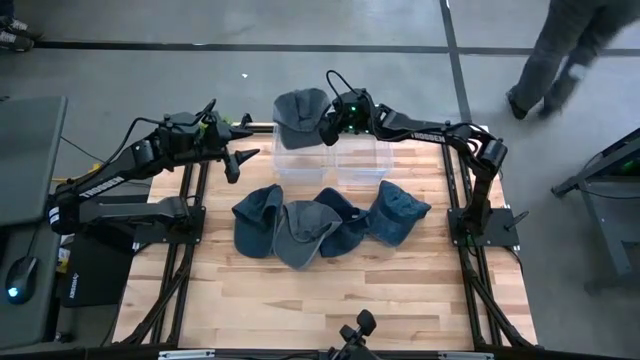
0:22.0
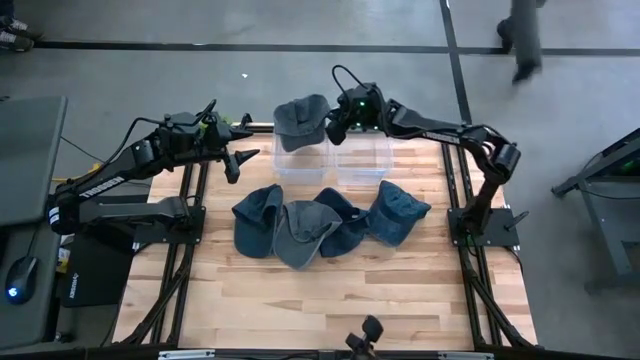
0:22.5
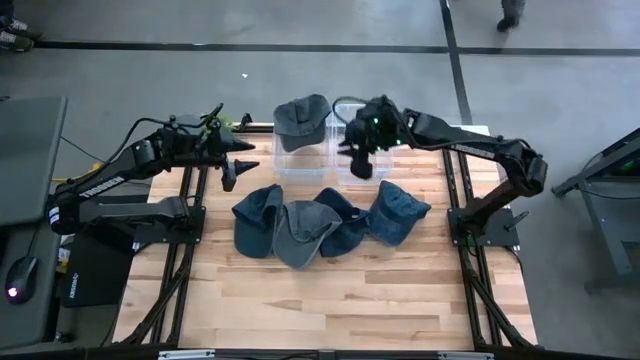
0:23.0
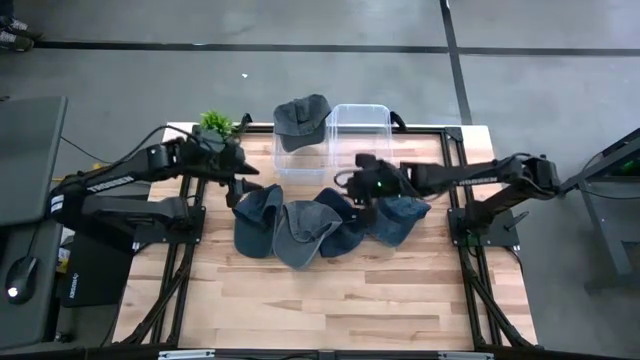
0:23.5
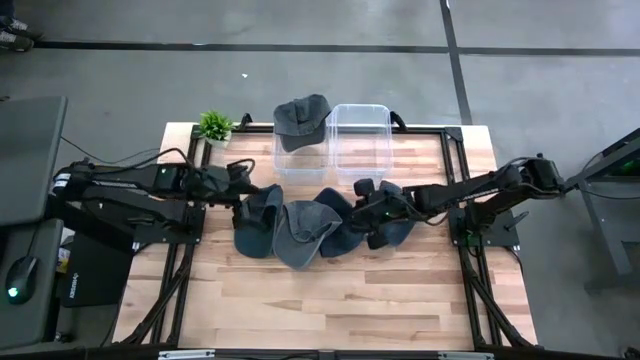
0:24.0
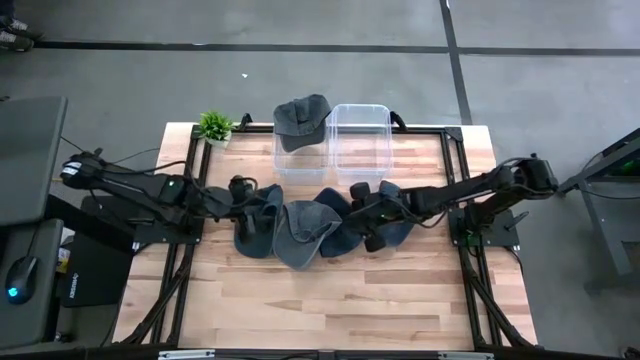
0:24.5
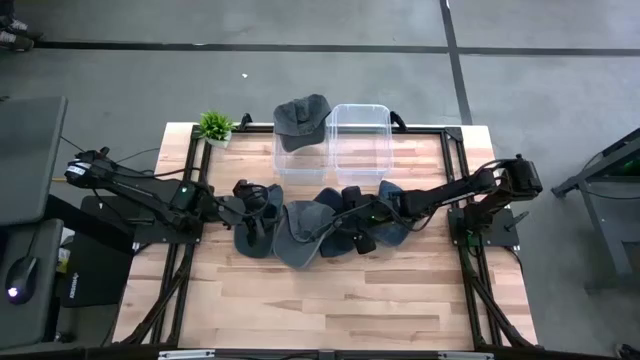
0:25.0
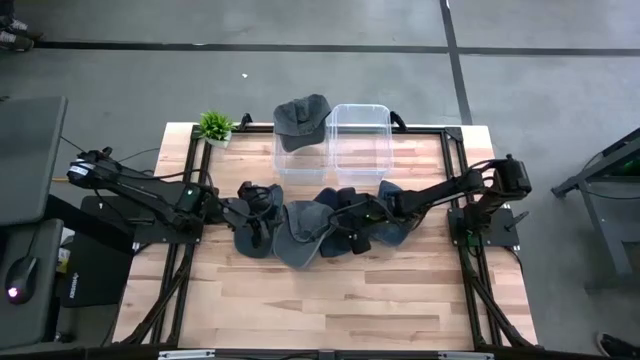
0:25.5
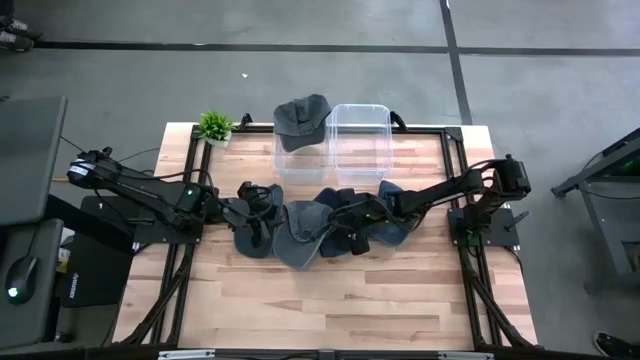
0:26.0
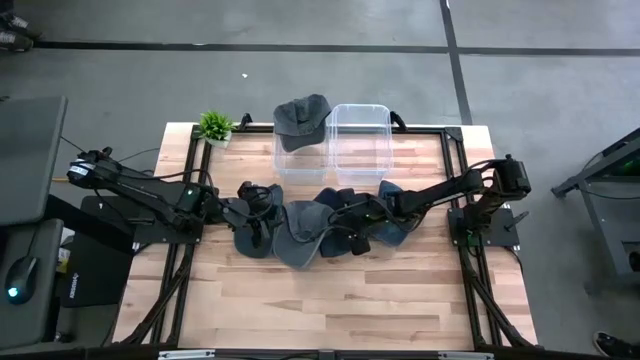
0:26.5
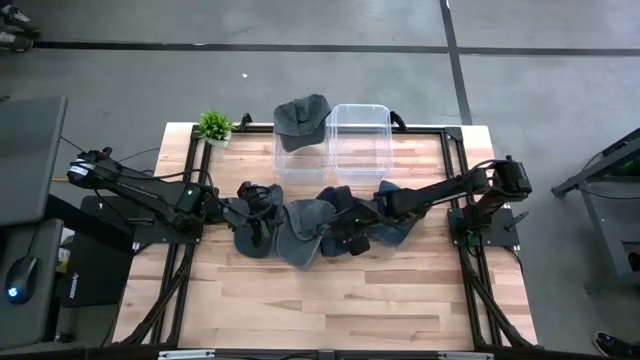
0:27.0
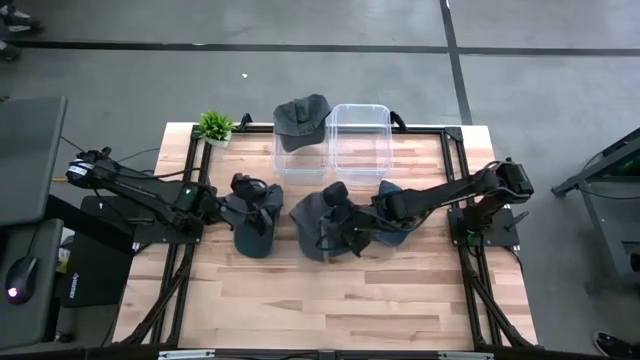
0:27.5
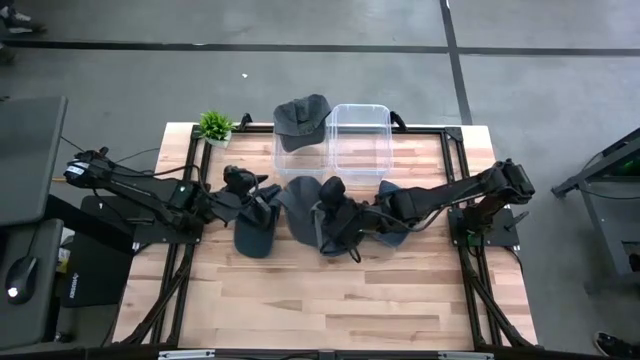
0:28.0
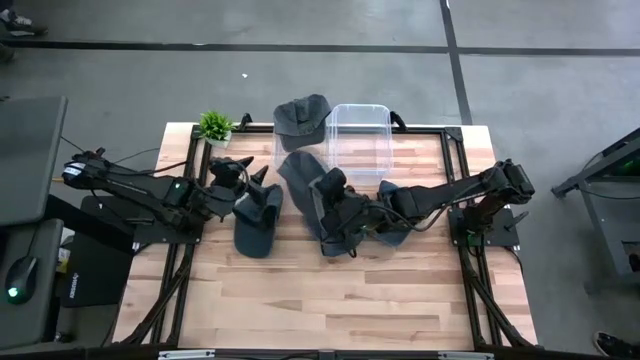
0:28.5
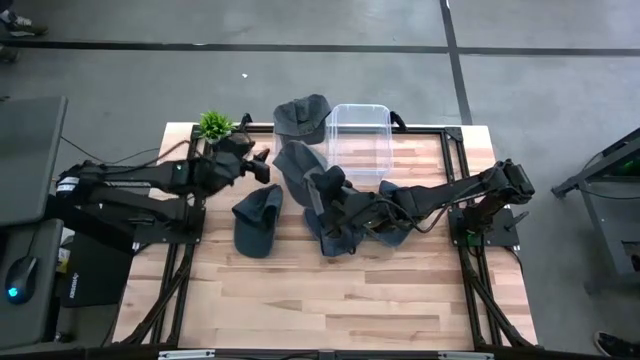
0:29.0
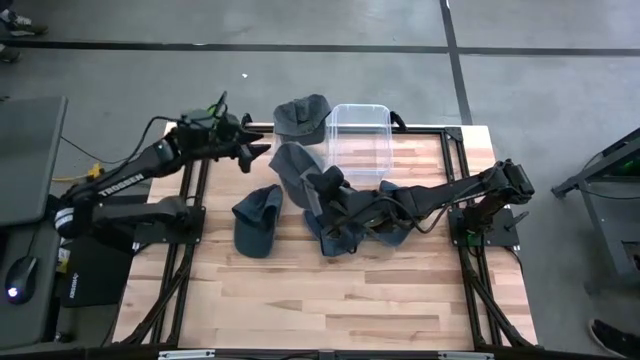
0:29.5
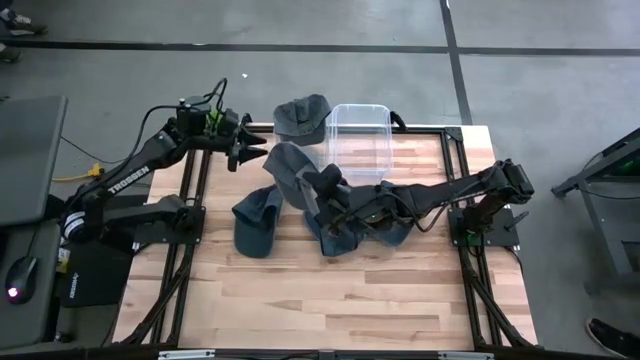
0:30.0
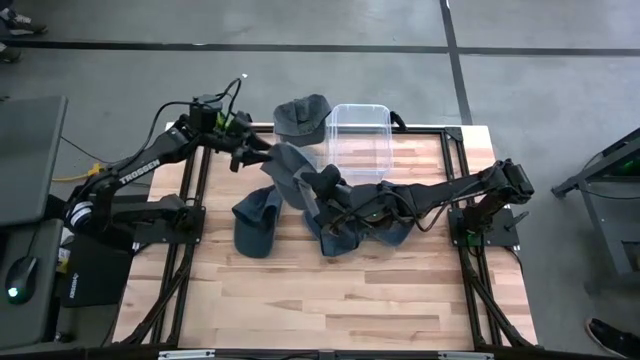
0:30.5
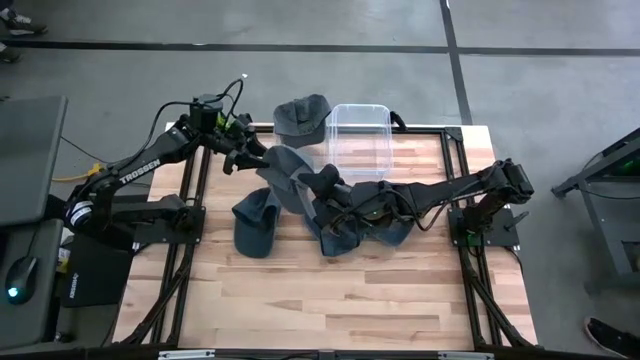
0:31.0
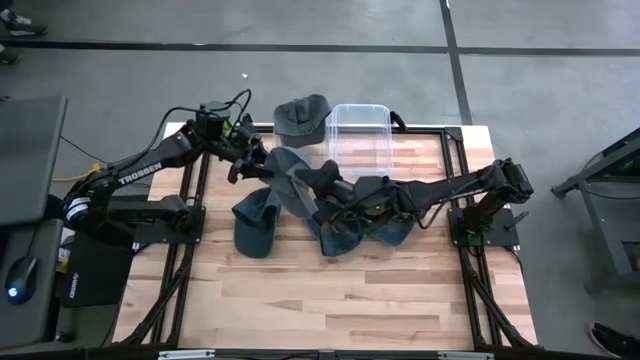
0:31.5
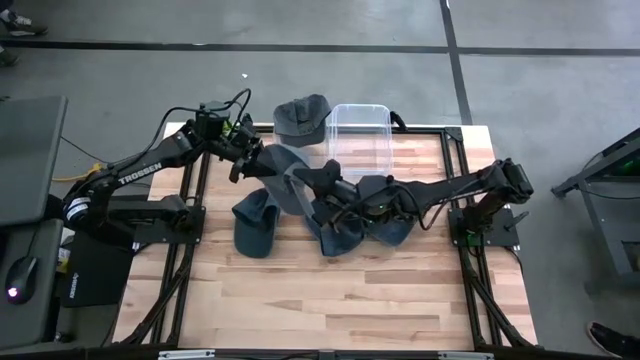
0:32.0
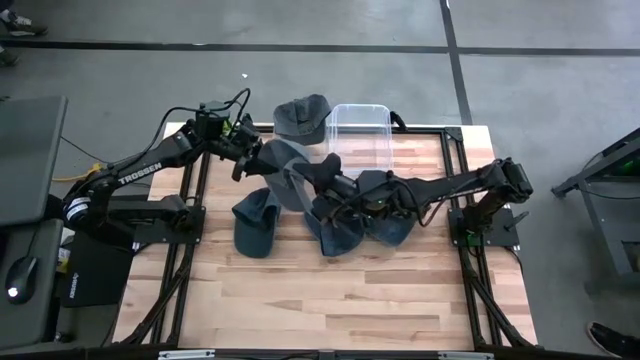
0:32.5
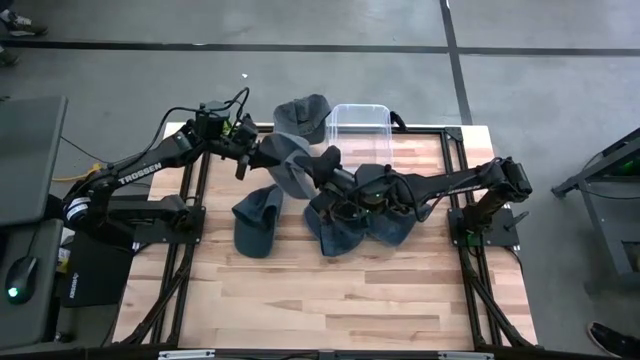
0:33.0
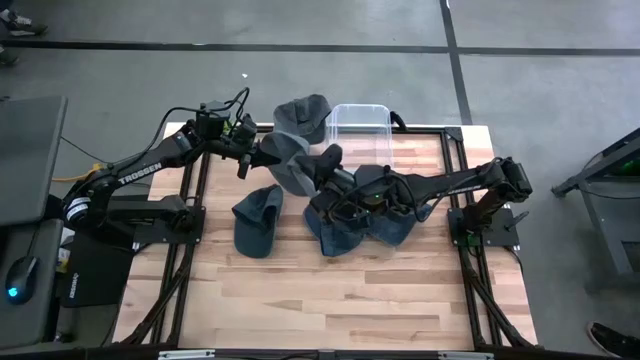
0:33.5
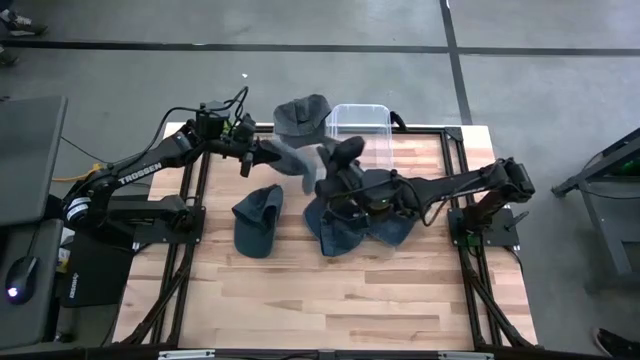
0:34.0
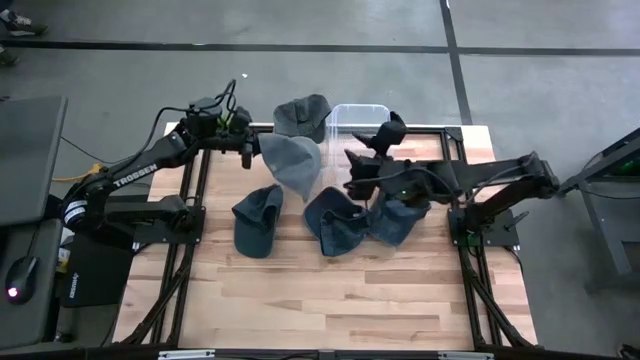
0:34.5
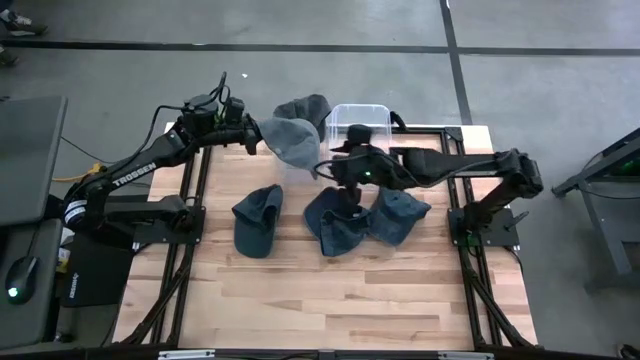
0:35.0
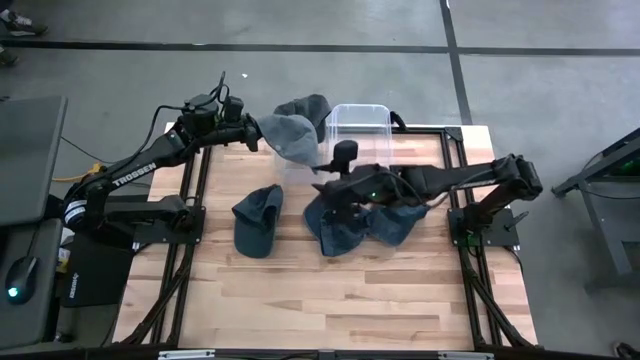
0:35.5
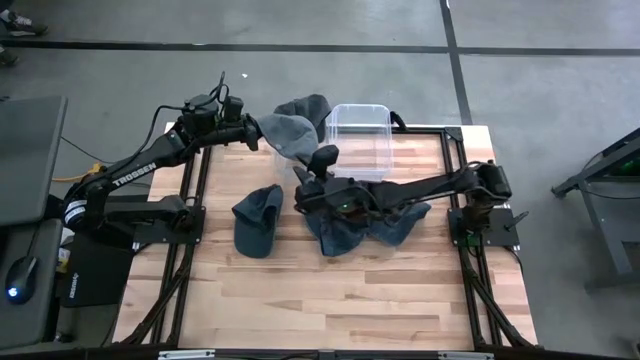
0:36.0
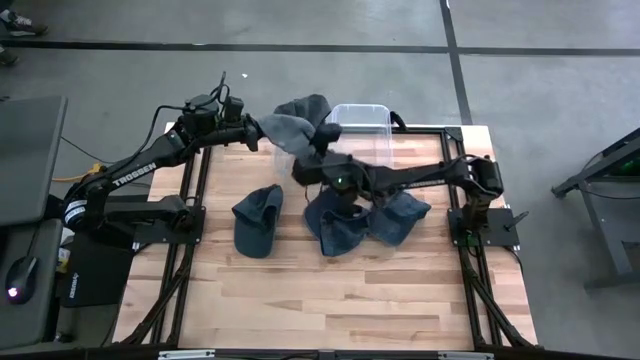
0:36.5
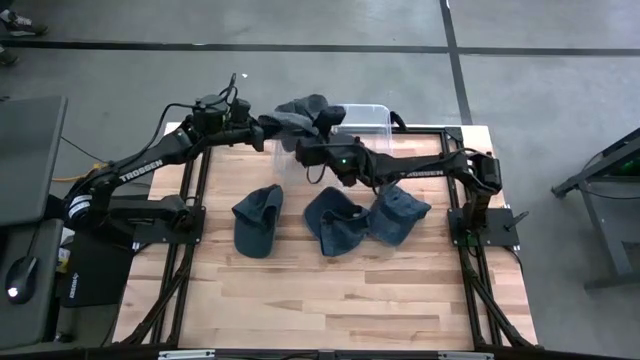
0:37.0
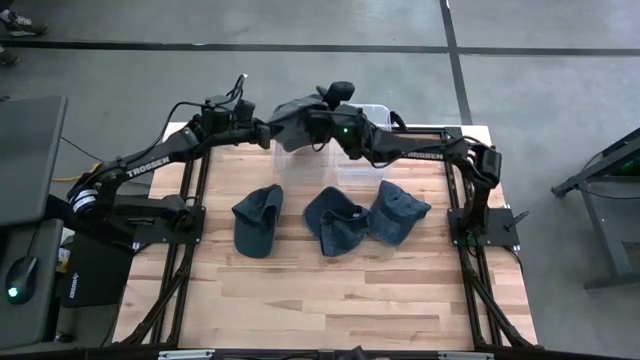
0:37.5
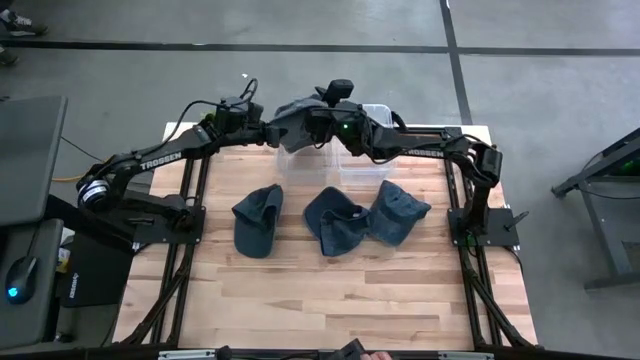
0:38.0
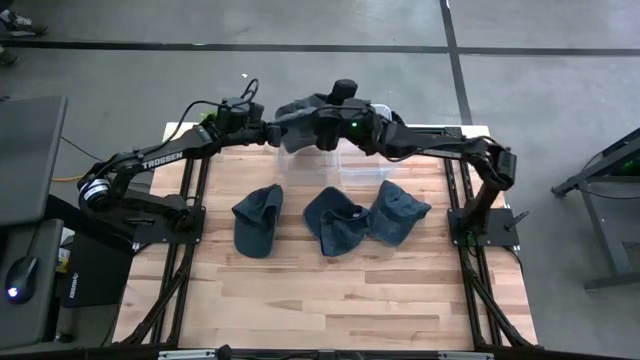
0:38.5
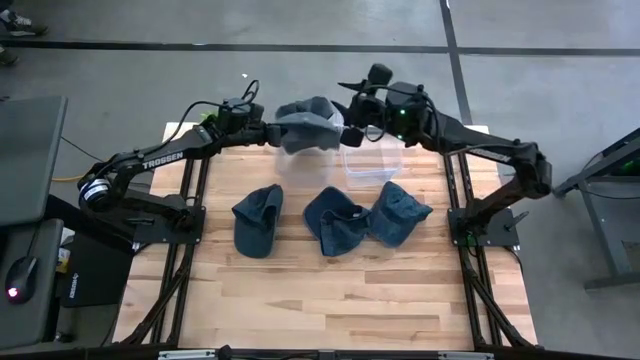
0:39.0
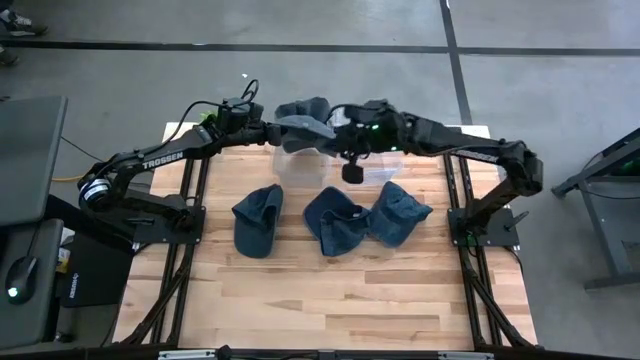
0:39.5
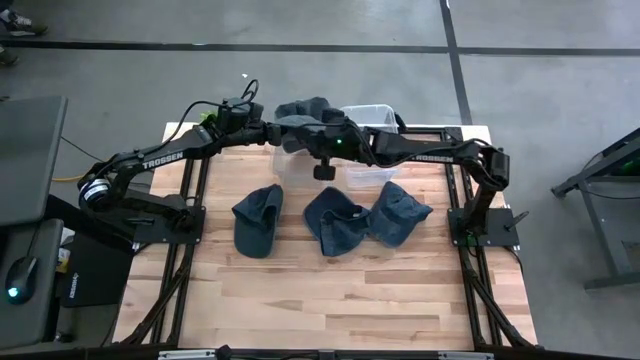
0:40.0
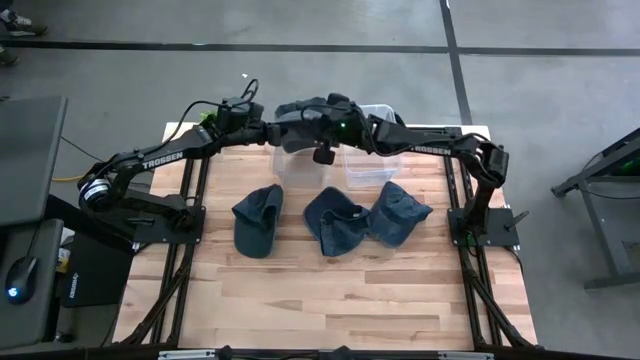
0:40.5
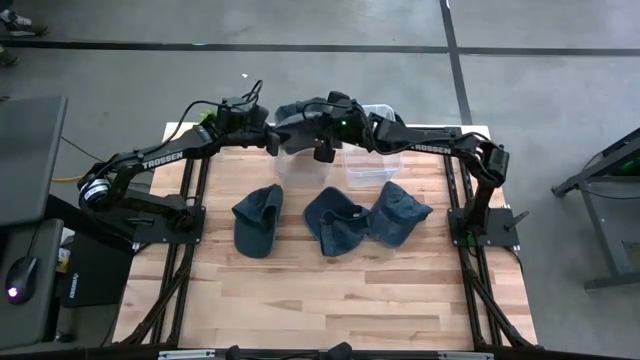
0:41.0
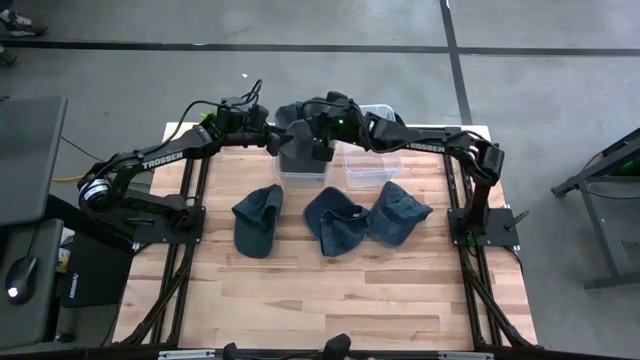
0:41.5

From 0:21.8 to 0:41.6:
Task: Pick & Place hat
Put the gray cap into the left transparent bin
